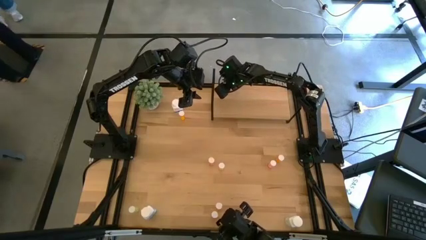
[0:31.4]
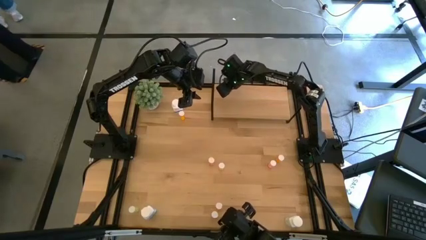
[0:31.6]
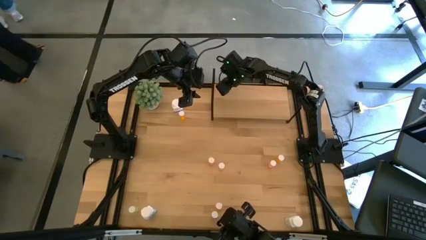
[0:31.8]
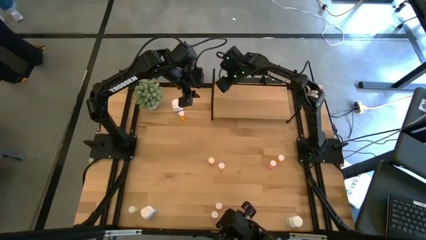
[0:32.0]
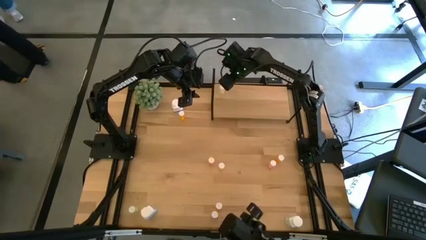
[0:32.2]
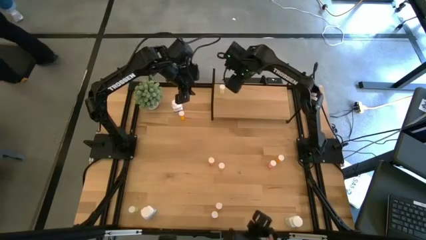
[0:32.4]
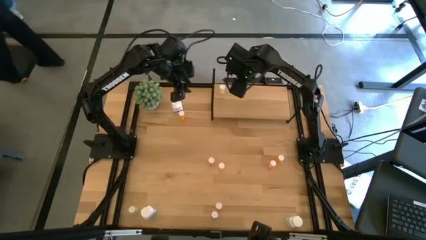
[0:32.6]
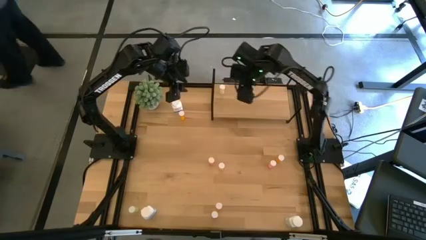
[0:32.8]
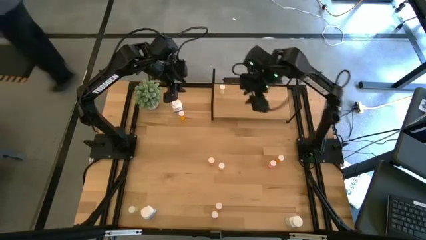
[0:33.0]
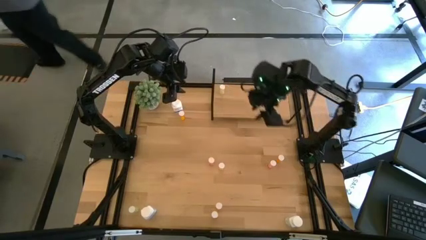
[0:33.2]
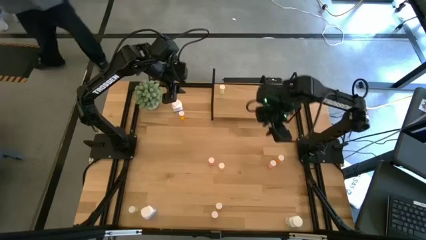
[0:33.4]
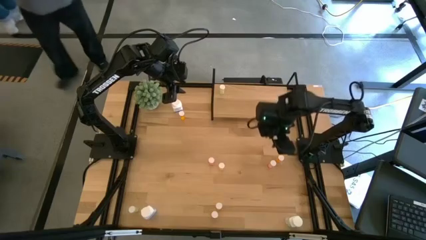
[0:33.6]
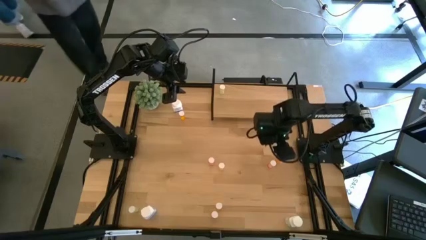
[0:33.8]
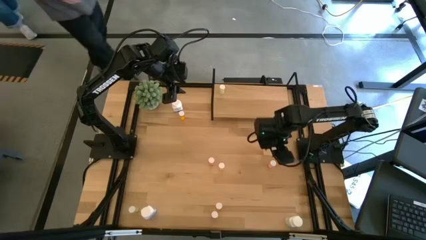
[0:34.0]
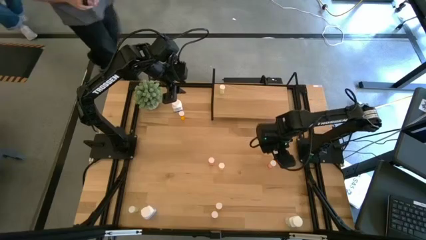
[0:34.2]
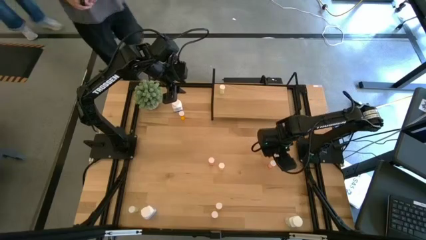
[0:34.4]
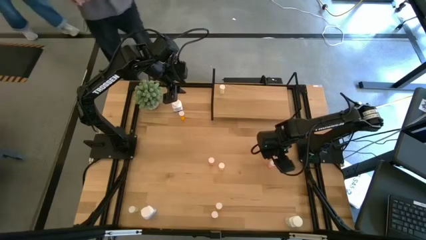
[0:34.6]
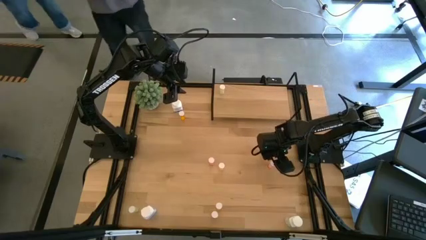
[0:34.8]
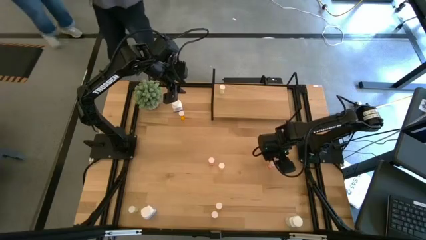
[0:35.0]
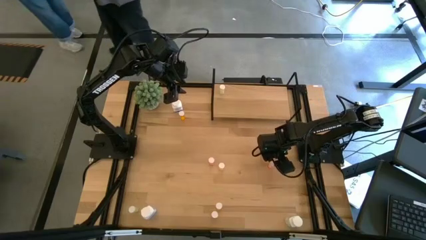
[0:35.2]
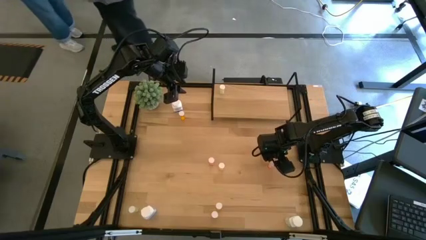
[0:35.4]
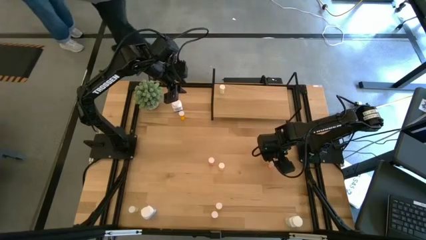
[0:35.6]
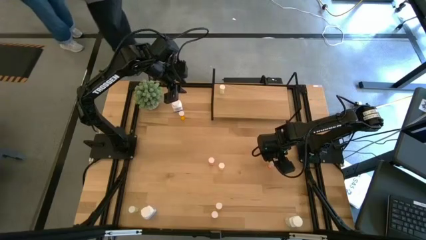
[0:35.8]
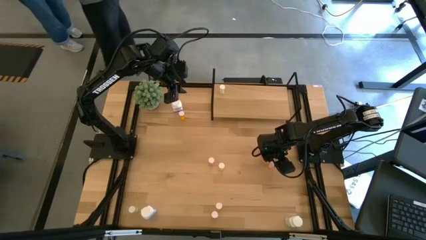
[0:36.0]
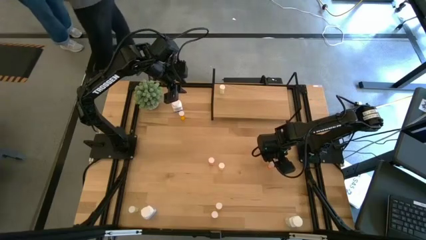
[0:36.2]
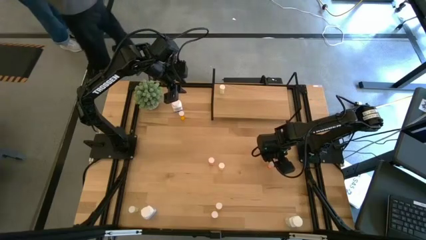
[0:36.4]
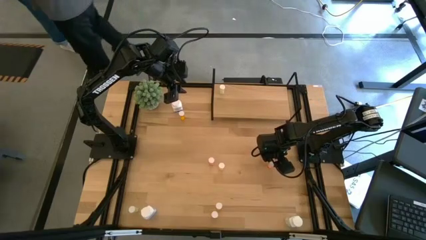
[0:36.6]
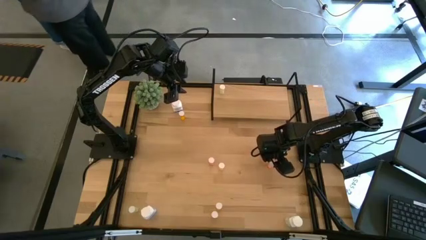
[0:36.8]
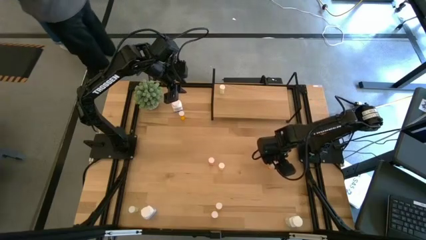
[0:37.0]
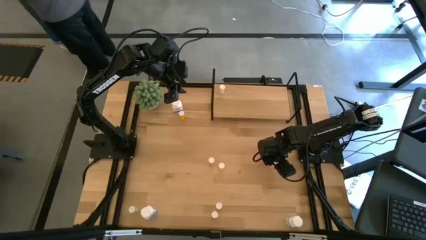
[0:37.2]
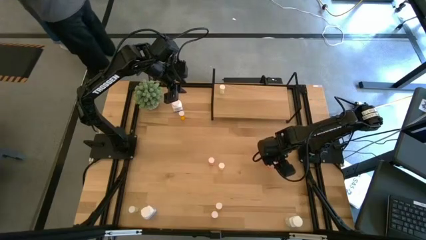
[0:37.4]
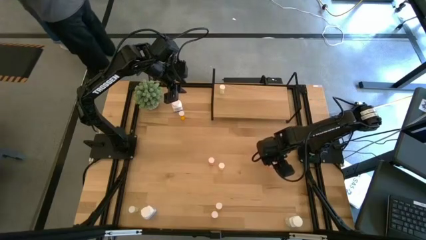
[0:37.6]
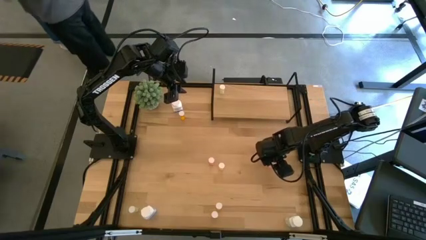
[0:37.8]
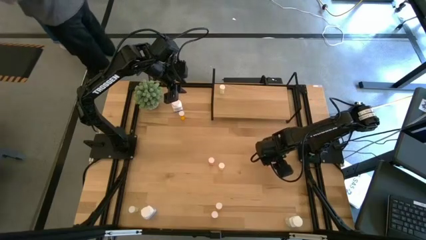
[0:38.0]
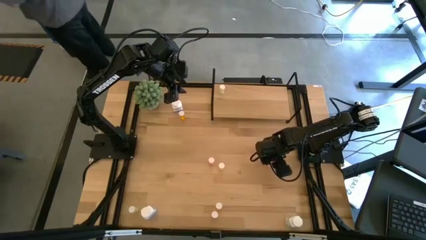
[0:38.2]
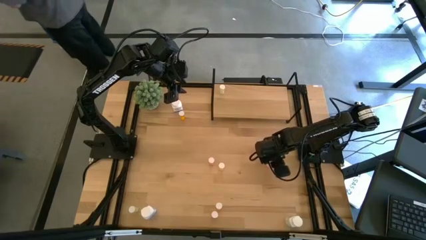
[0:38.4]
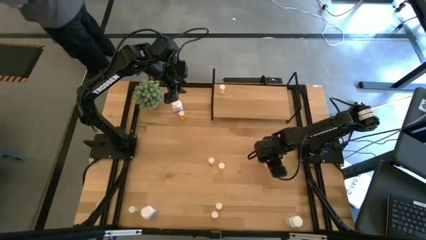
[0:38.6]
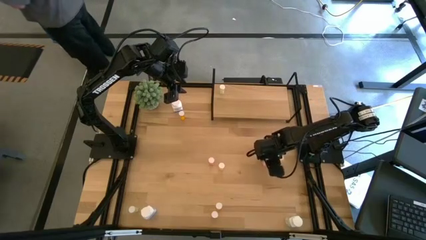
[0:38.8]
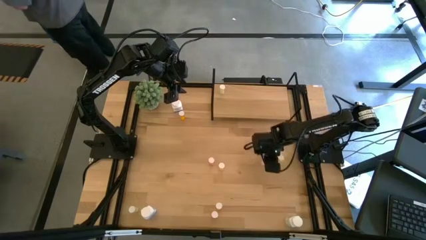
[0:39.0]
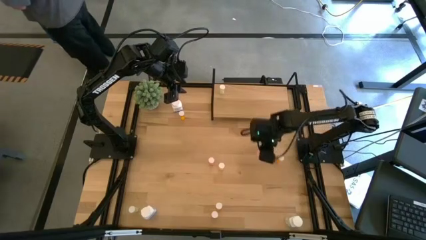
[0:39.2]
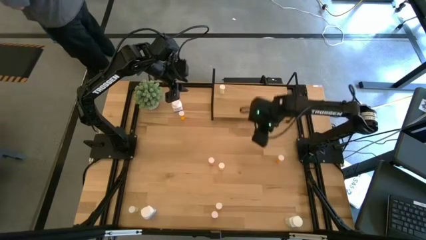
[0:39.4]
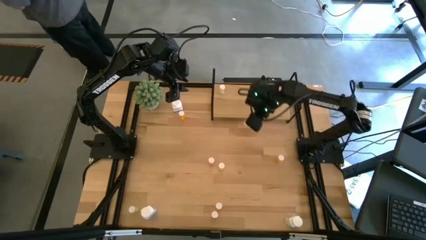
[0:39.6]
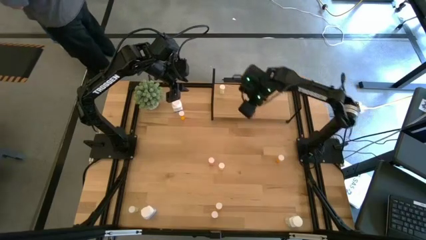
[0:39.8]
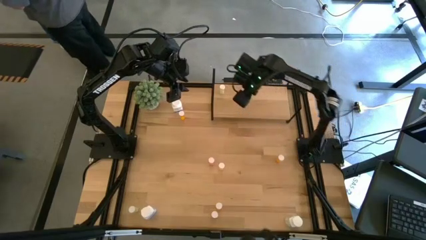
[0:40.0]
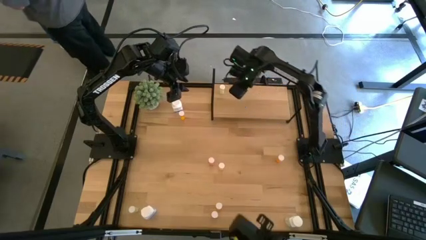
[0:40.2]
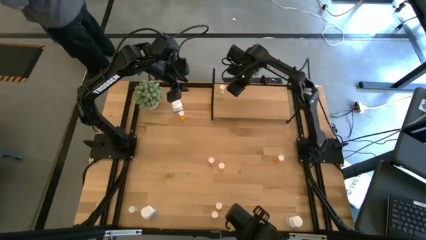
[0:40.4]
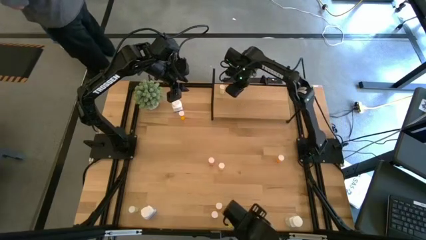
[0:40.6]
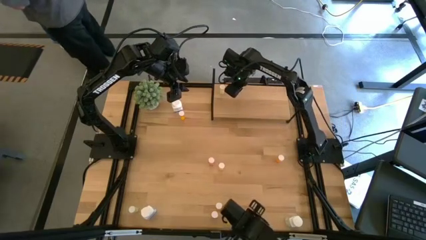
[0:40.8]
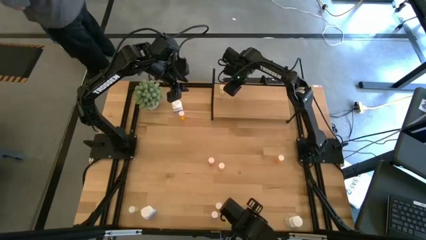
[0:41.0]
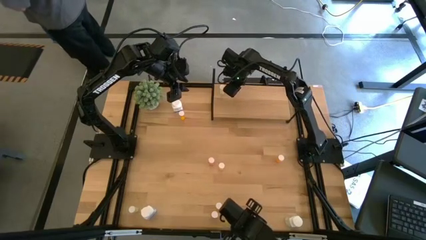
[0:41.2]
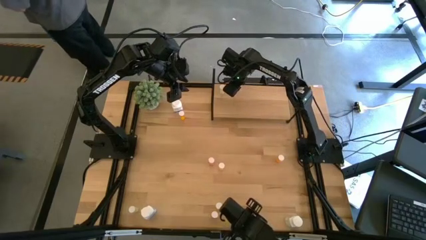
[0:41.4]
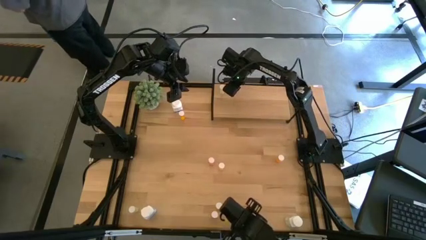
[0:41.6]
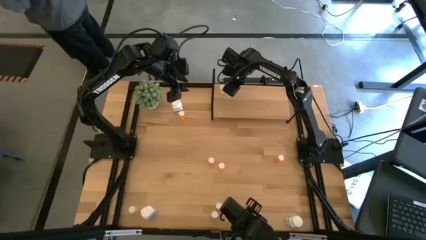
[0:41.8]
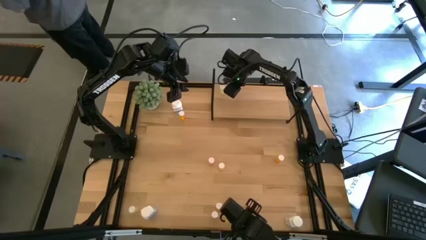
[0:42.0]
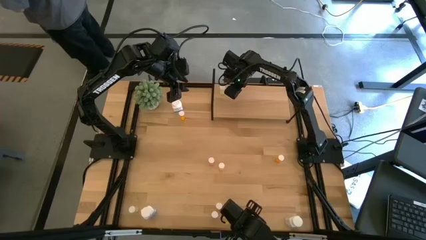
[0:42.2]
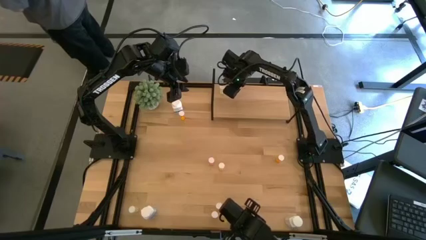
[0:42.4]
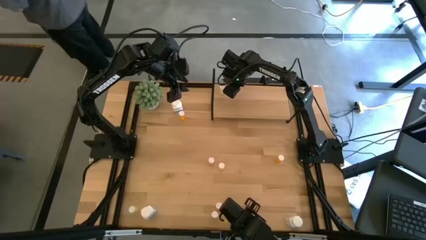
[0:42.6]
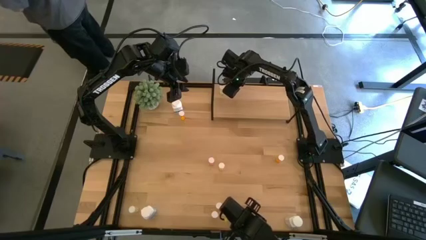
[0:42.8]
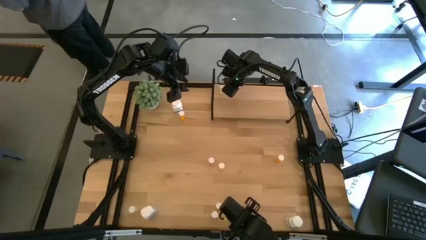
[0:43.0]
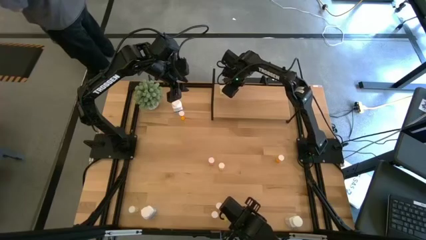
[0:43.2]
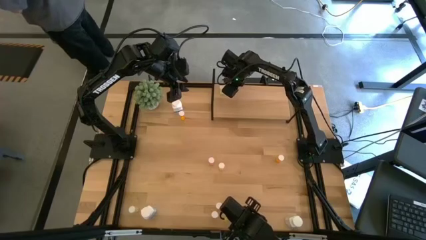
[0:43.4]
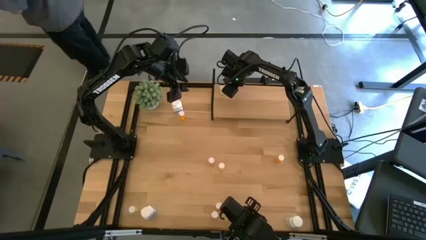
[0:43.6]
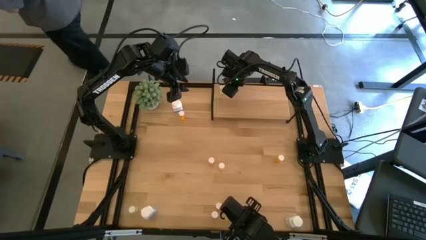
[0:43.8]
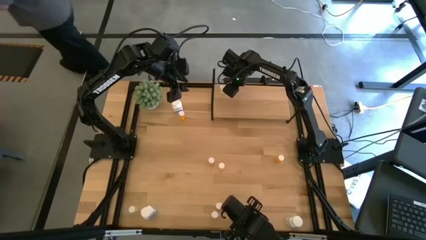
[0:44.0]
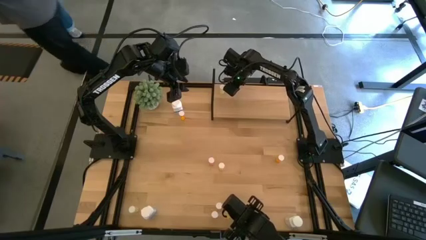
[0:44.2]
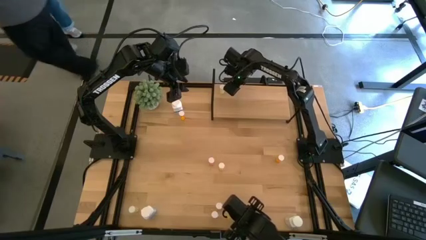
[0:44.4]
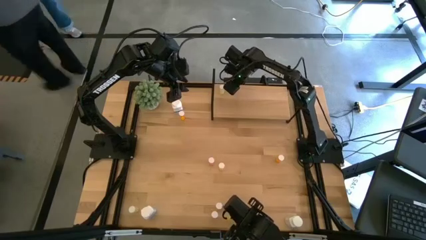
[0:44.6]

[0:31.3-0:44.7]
Task: Pick and place medicine bottles onto shelf by color
Put the top right pink pill bottle on the shelf

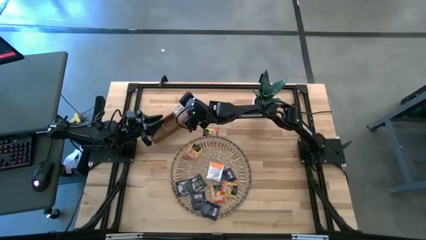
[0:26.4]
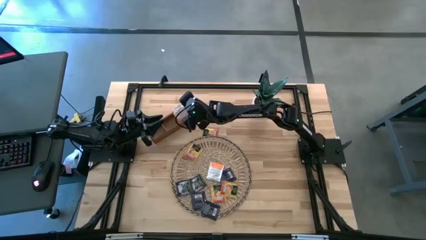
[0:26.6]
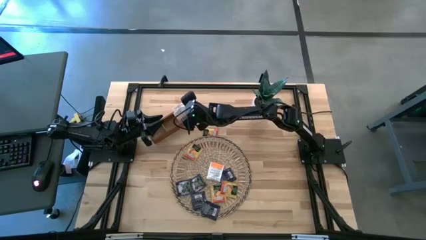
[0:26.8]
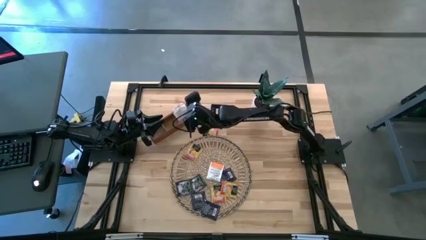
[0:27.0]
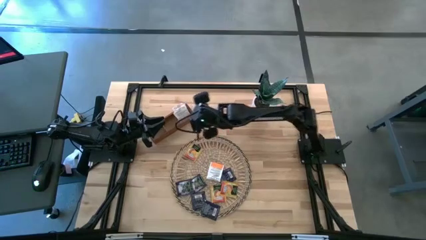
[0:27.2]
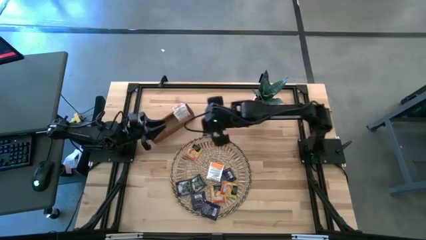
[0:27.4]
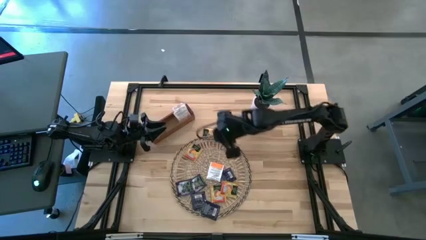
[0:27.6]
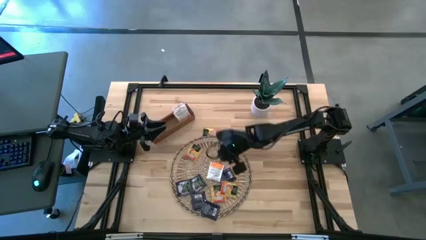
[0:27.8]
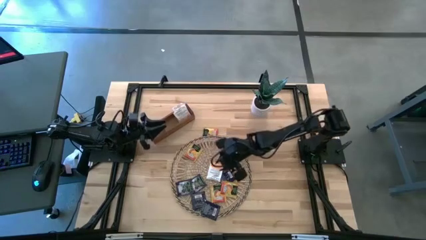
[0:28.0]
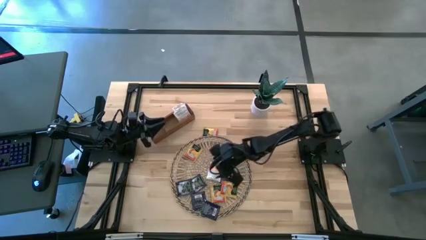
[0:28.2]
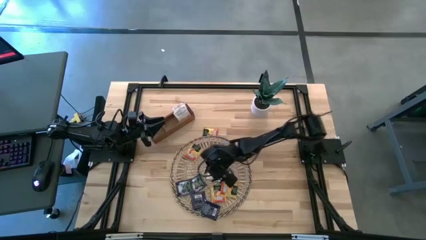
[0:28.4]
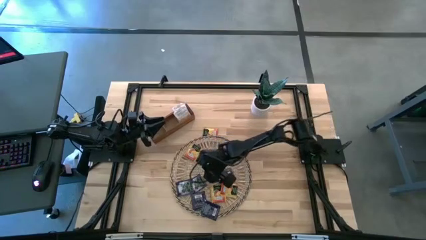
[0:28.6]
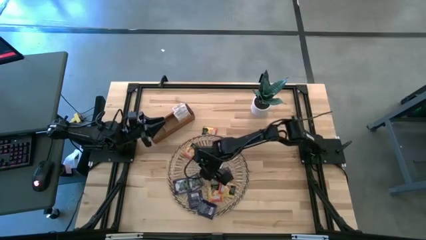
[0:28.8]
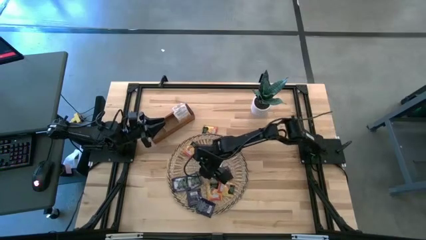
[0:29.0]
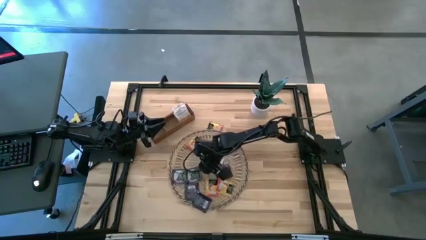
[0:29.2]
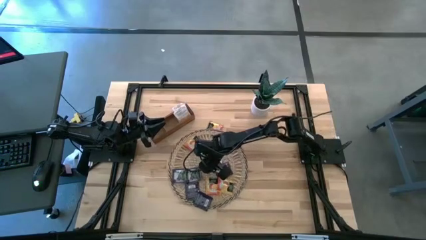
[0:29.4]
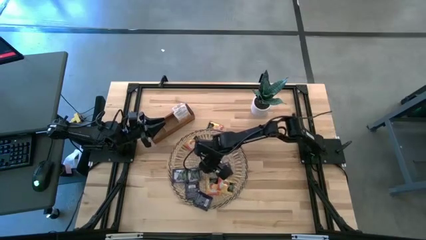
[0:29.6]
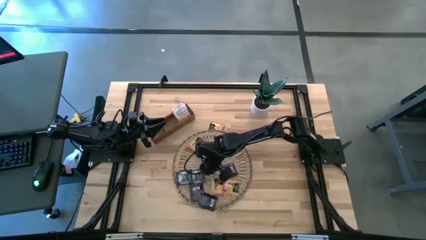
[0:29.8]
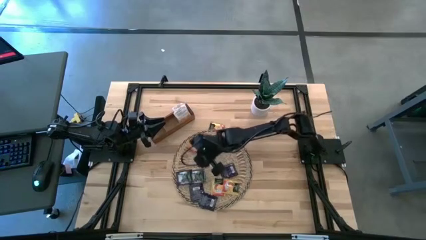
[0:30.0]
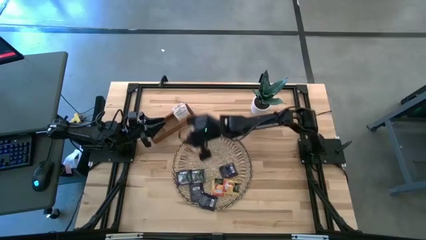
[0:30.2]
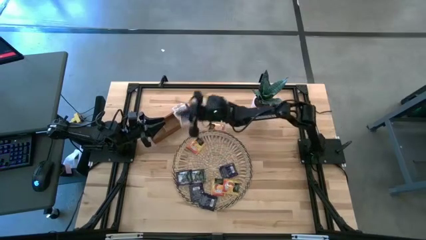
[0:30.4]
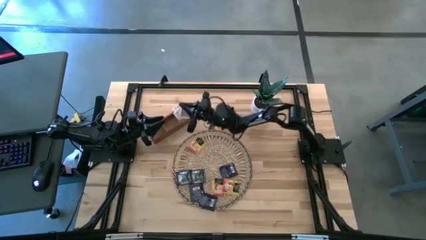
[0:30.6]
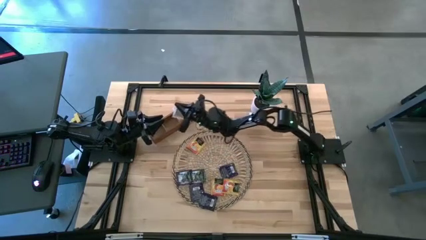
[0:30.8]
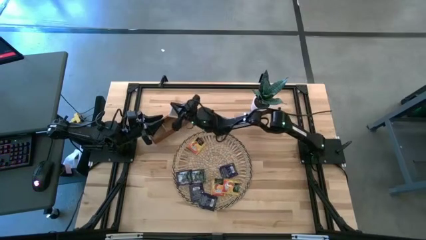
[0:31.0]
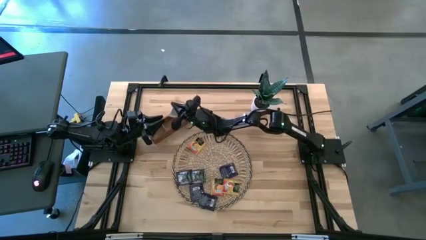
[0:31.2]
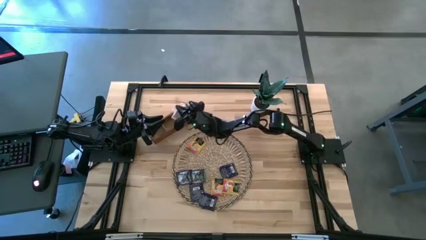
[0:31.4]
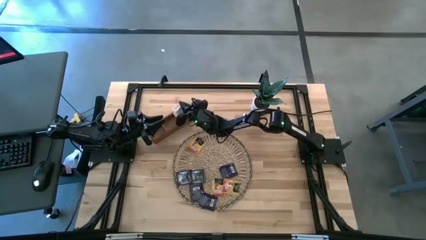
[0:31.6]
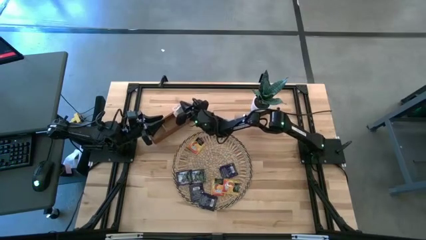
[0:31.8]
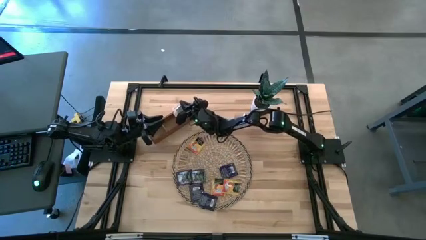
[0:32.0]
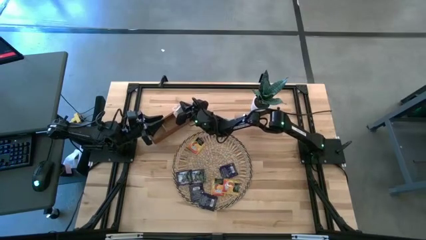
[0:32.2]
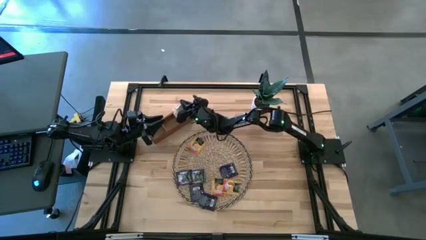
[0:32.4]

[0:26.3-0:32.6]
Task: Pick & Place Tea
Put the white tea bag into the right compartment of the wooden organizer
